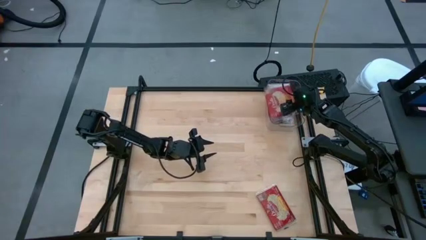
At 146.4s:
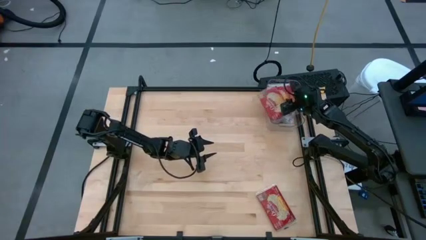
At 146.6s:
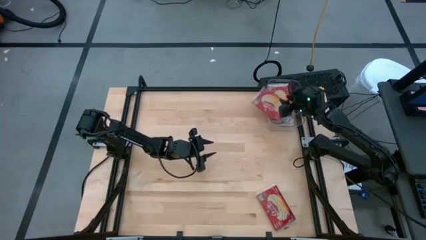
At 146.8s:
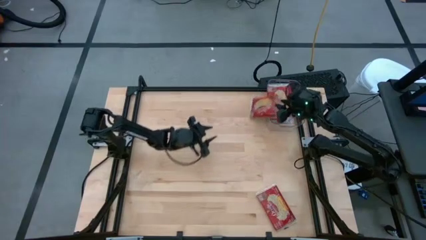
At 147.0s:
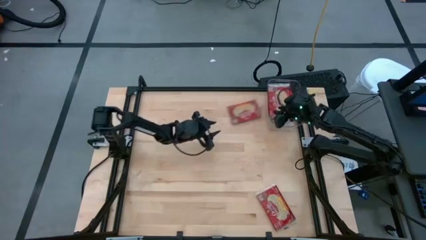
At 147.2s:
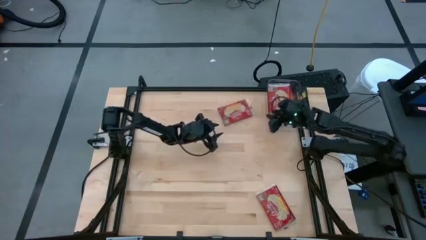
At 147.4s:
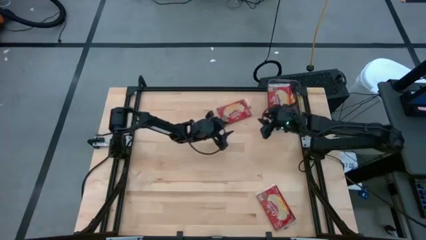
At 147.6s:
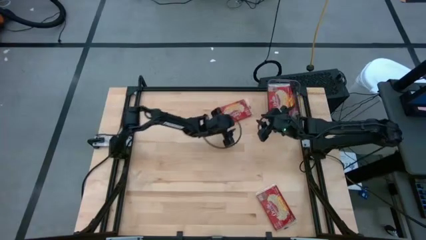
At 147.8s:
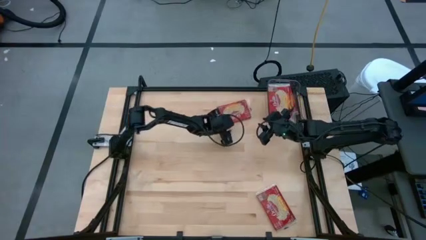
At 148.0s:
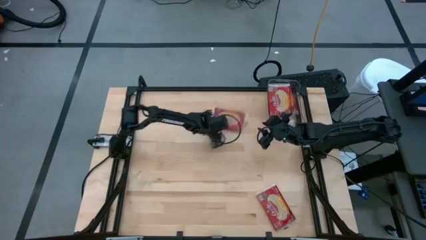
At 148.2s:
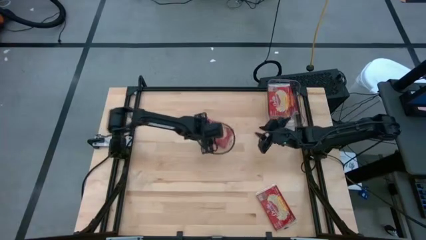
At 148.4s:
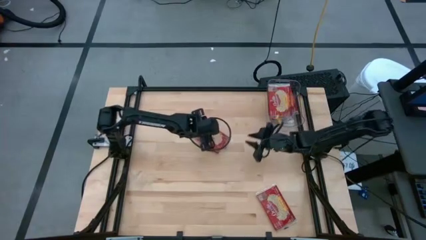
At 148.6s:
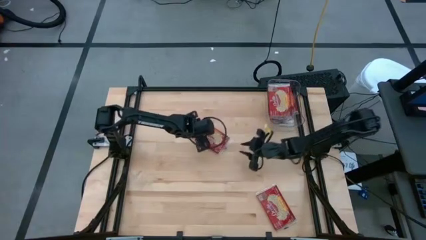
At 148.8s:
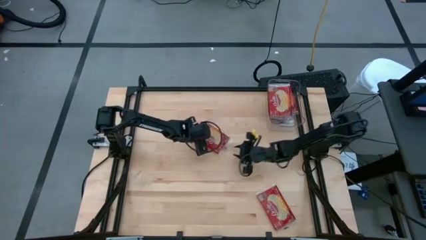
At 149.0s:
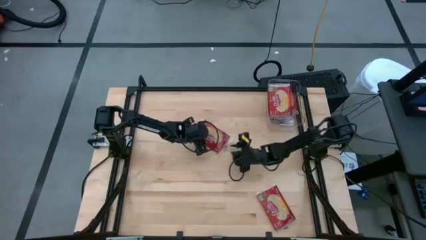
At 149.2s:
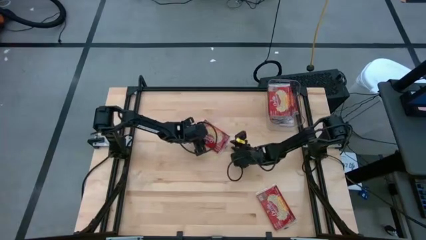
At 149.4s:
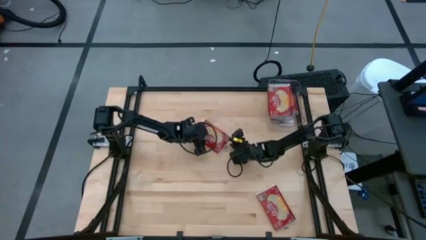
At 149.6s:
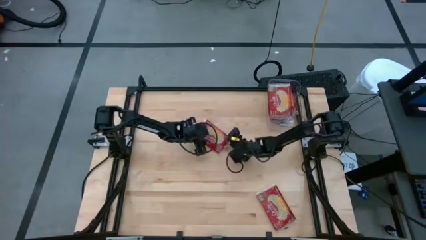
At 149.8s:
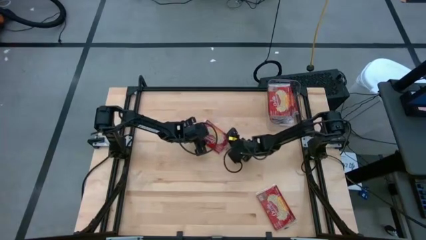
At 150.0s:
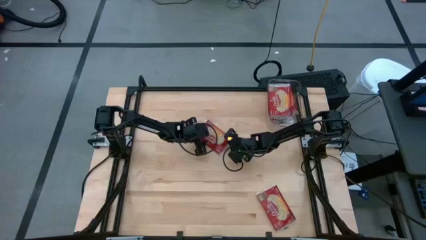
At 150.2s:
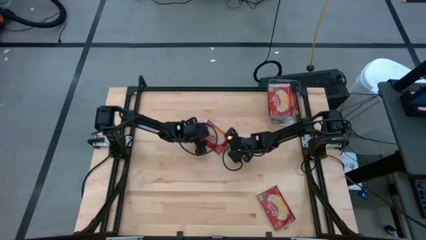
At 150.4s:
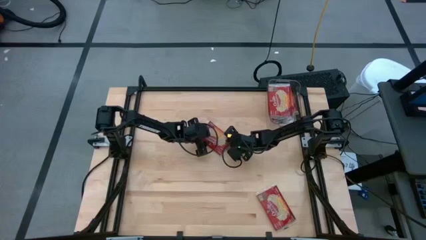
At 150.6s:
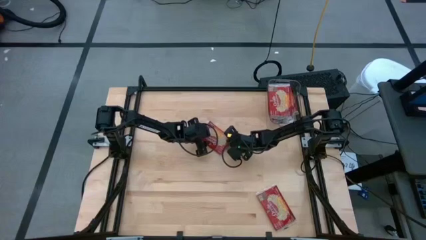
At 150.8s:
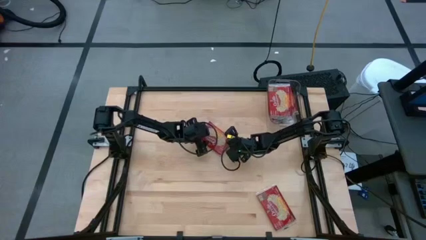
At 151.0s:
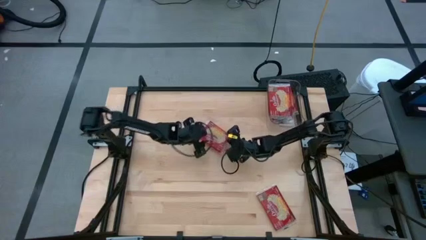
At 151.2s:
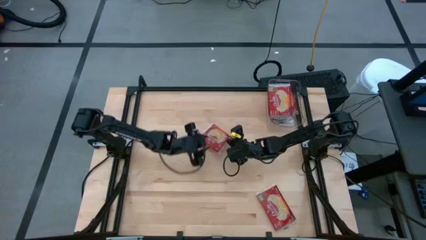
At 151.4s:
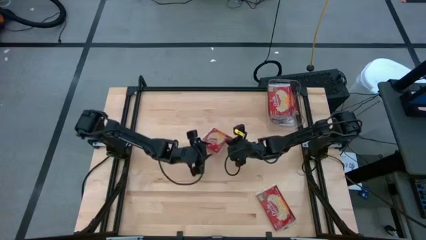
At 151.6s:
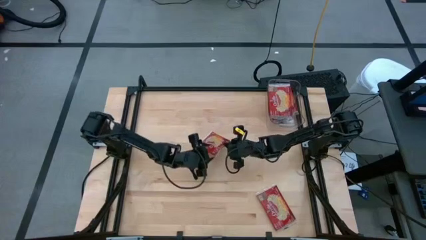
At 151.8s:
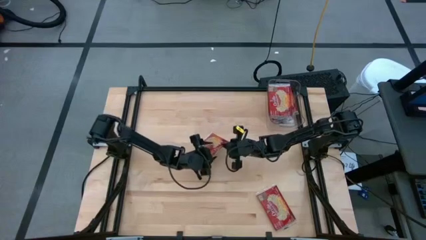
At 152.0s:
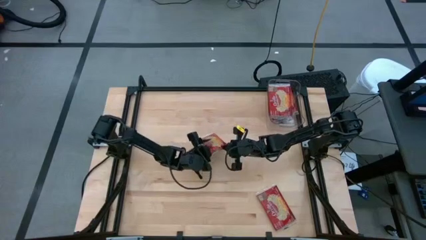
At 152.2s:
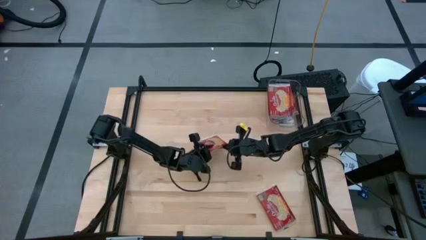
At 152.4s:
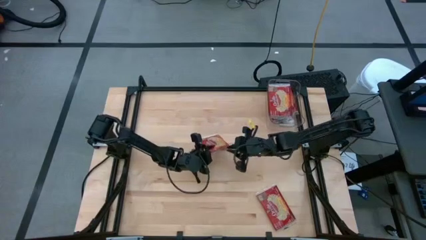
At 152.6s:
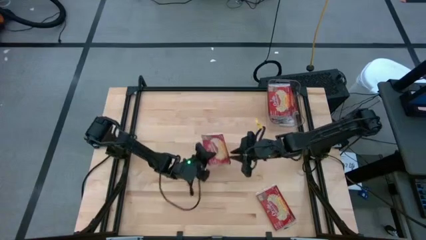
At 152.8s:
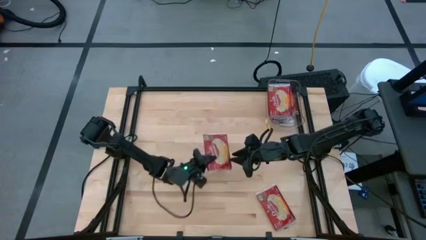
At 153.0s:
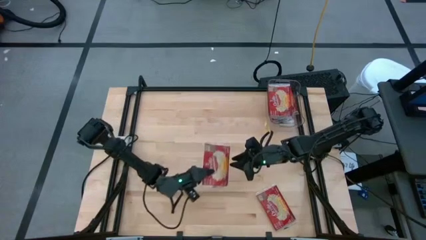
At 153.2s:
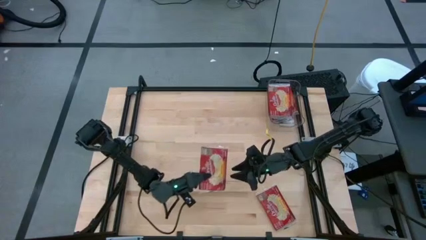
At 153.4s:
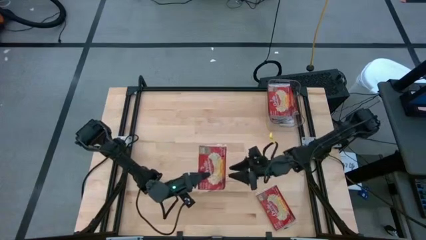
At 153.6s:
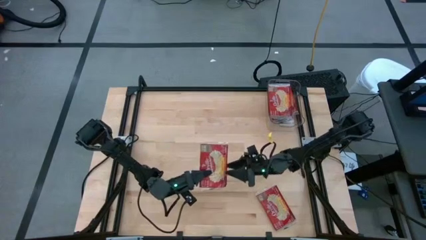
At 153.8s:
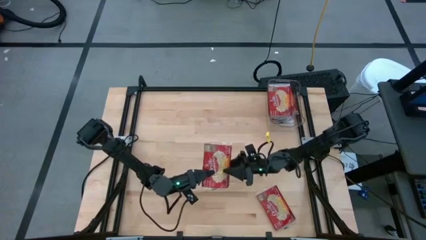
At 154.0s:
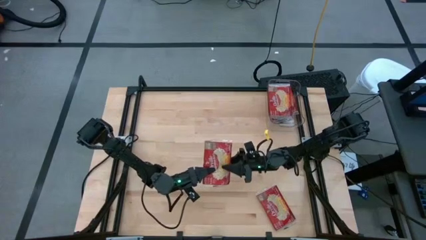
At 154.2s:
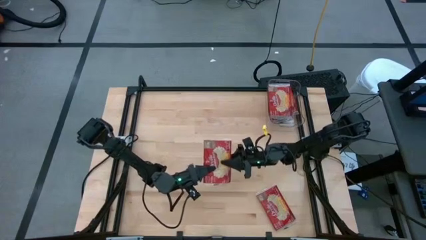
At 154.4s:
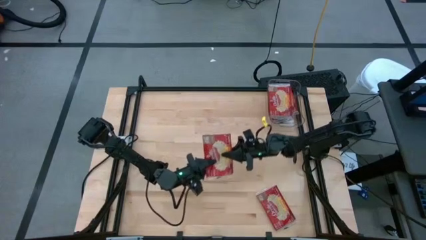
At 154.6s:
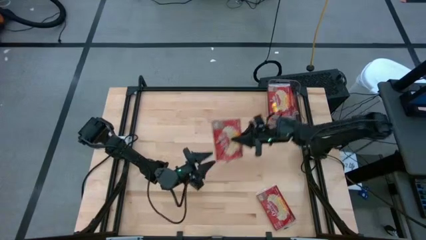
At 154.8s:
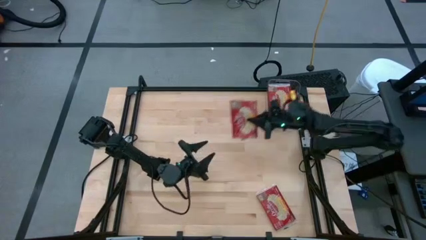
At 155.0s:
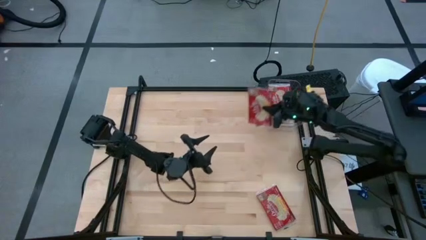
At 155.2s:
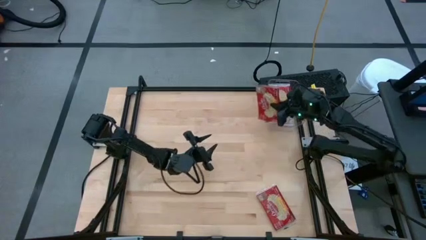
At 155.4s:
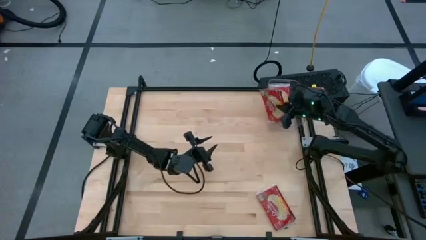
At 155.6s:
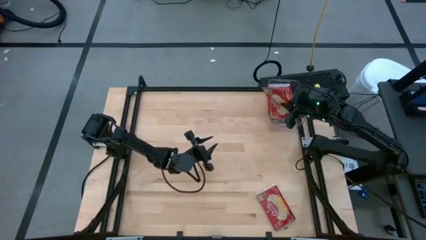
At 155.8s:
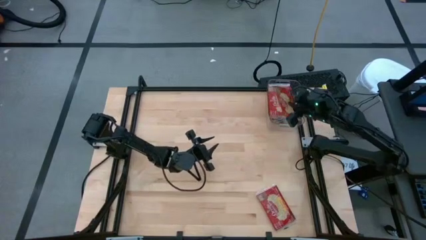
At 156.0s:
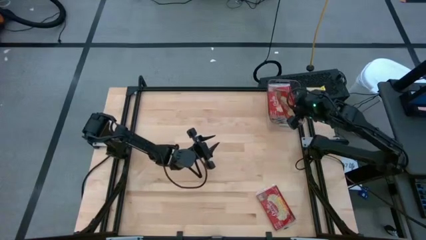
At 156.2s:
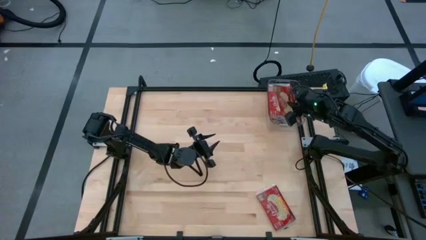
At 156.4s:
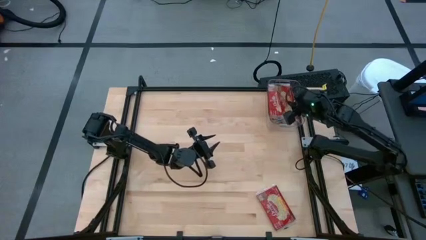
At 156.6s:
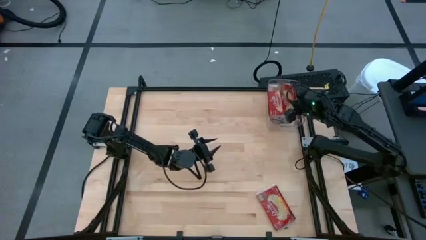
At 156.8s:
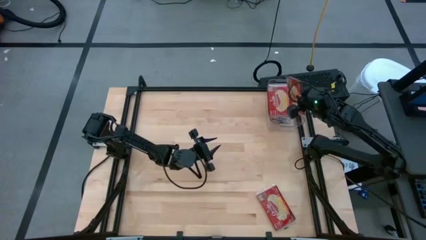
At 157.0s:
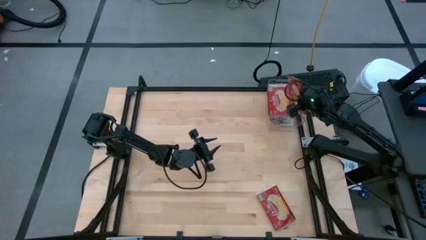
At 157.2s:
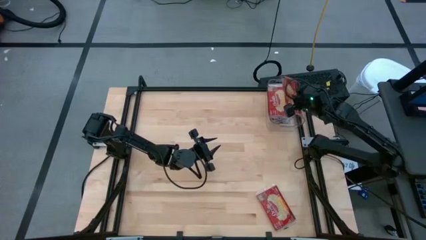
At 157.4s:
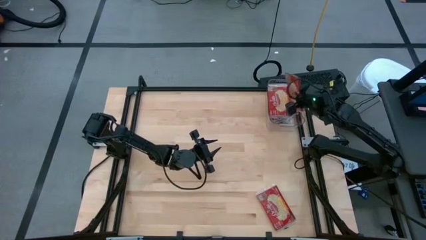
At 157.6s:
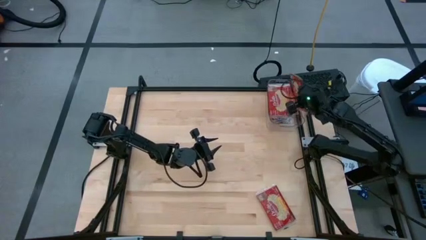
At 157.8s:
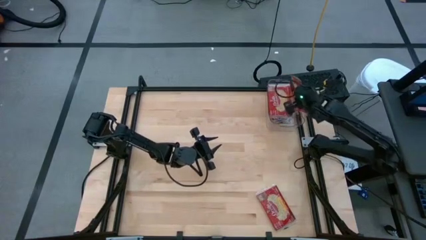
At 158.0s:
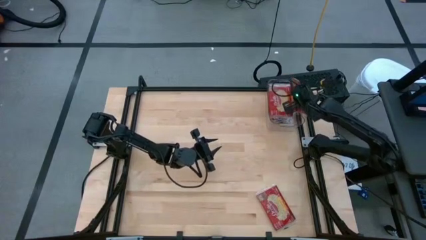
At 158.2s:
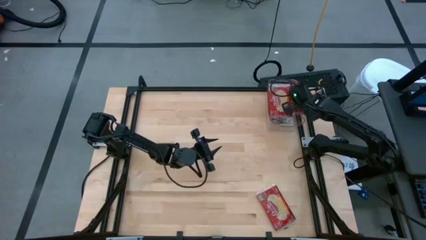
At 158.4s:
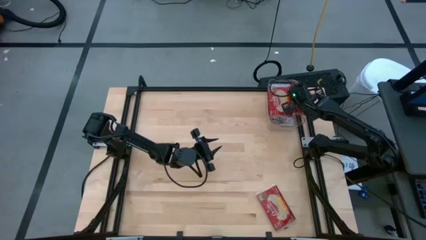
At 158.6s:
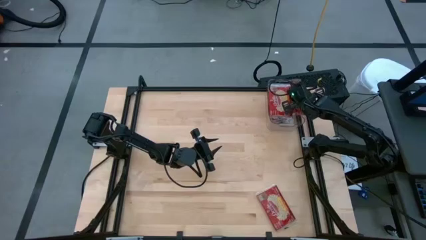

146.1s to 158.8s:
Task: Sort popcorn bags into baskets
Put the red popcorn bag into the transparent bin

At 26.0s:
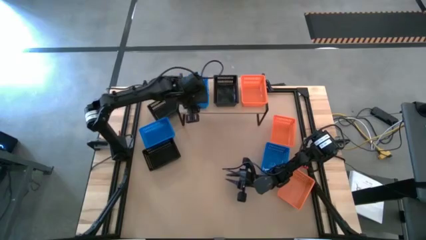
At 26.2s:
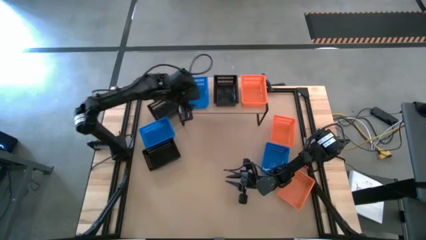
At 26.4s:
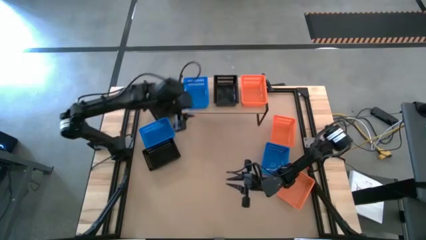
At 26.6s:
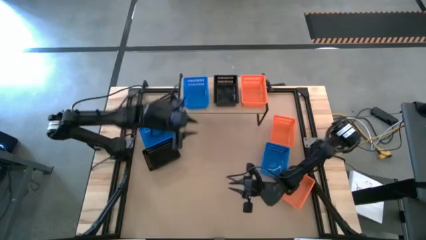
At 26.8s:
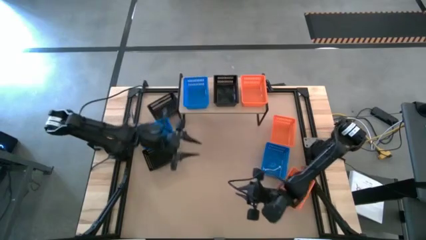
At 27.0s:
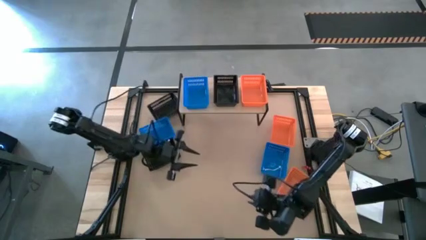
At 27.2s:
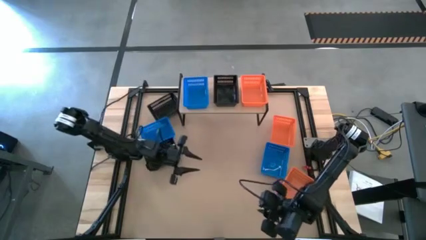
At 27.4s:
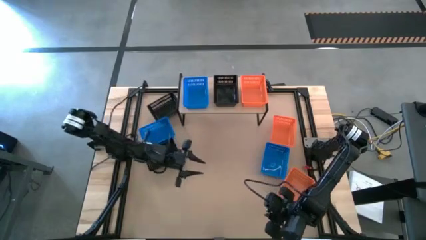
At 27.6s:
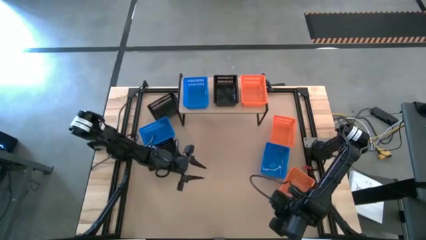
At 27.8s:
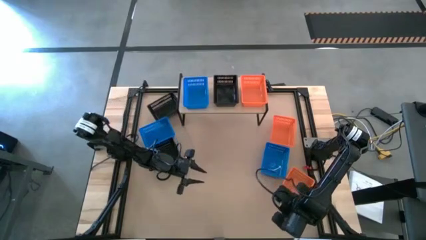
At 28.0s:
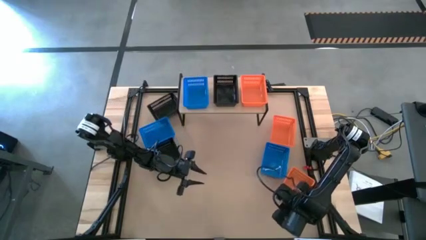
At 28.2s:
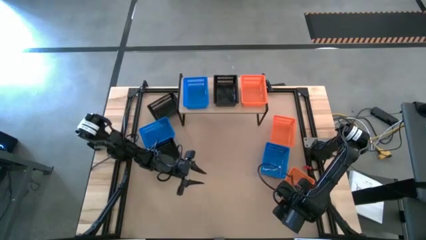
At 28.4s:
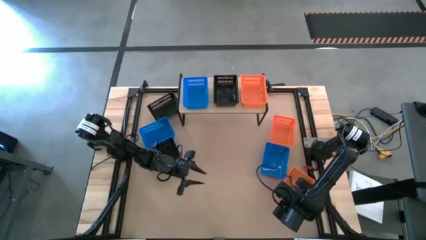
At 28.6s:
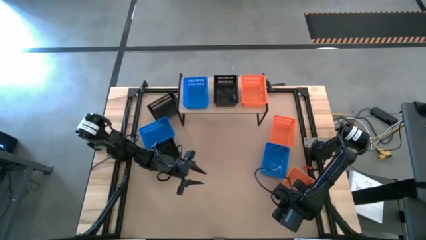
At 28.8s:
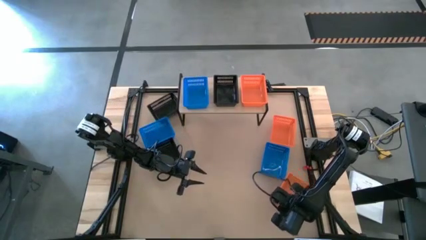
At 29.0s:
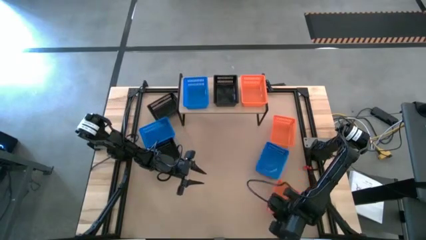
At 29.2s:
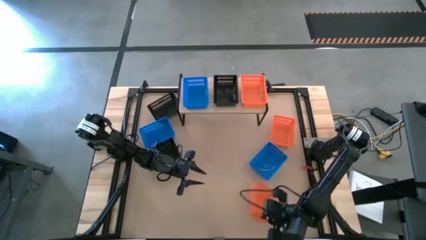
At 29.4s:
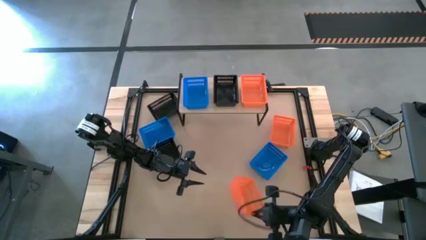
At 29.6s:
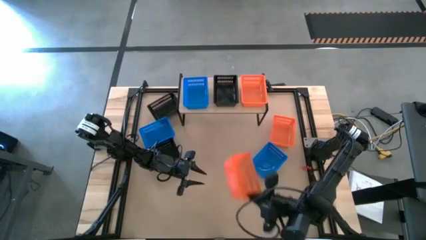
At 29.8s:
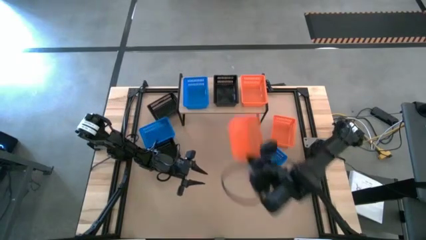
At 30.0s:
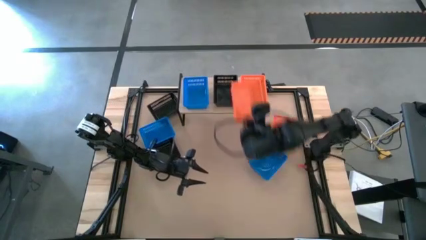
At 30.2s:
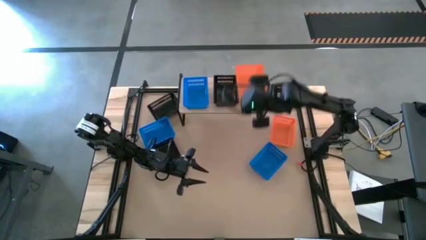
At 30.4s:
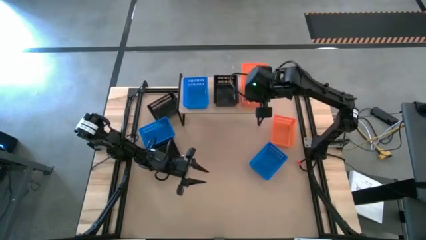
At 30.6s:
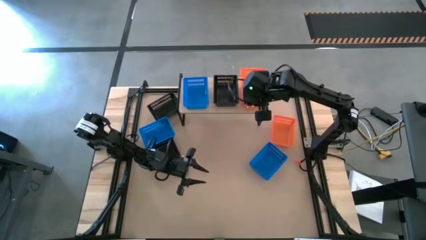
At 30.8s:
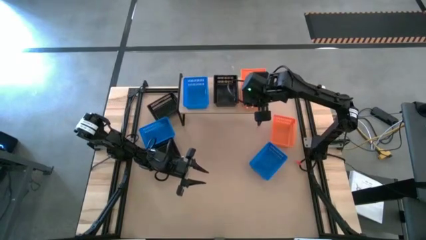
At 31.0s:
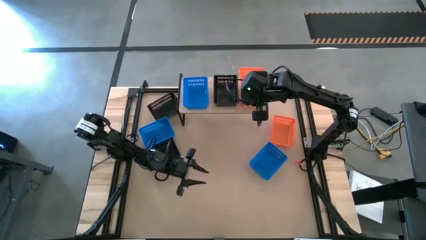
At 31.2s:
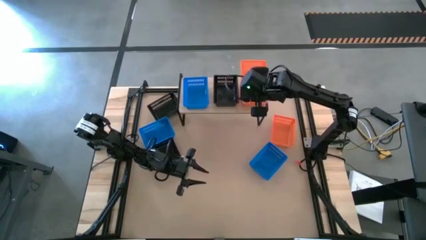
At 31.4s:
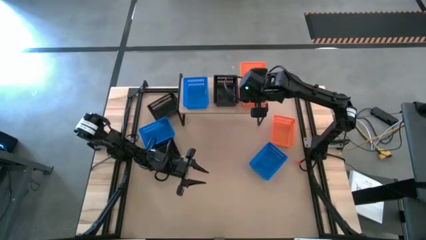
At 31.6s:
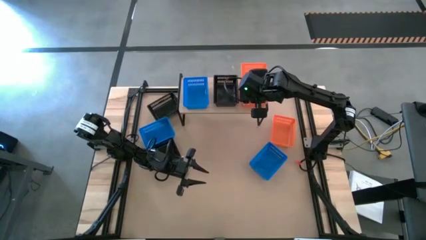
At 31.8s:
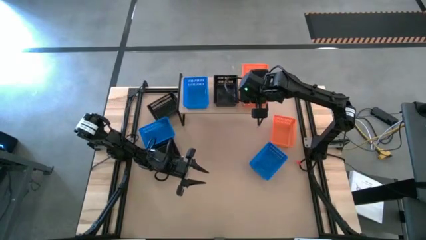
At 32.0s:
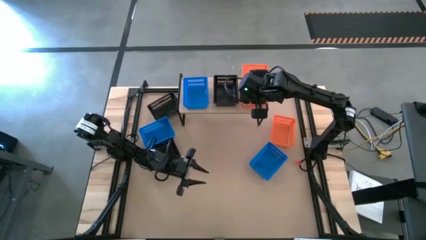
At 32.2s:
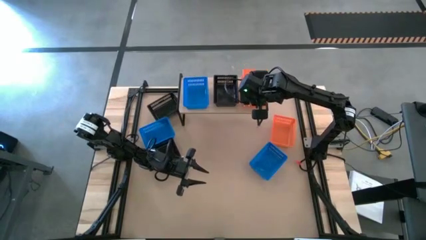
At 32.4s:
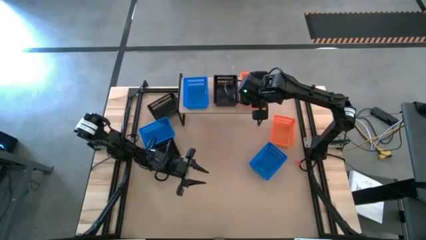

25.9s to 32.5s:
Task: Stack baskets on shelf by color
Stack the bottom orange basket on the orange basket on the shelf
